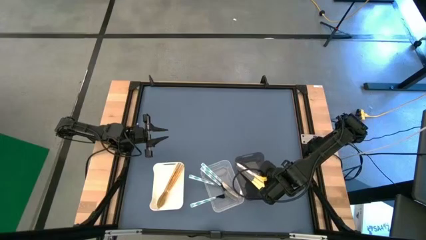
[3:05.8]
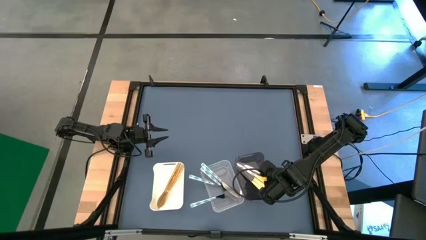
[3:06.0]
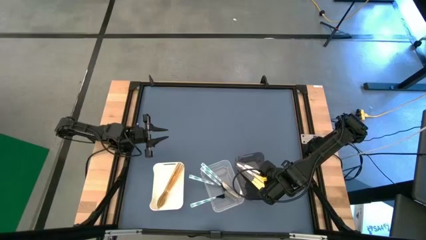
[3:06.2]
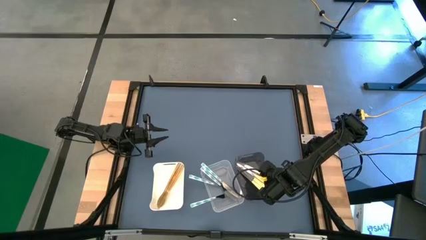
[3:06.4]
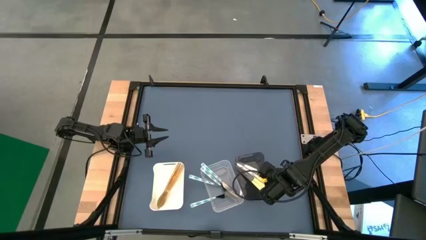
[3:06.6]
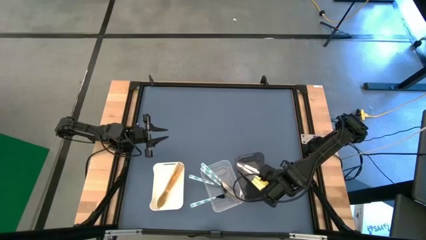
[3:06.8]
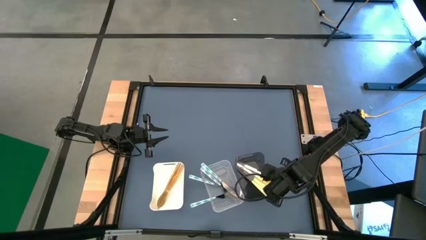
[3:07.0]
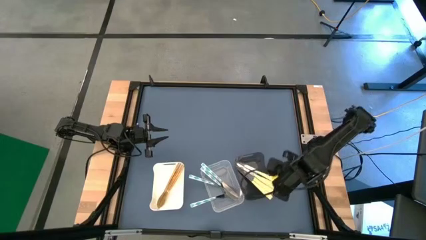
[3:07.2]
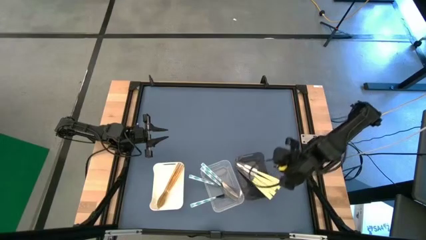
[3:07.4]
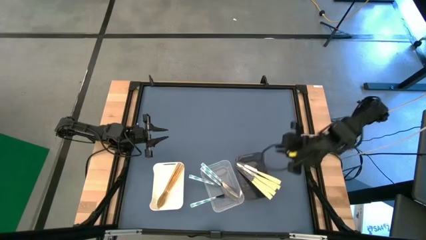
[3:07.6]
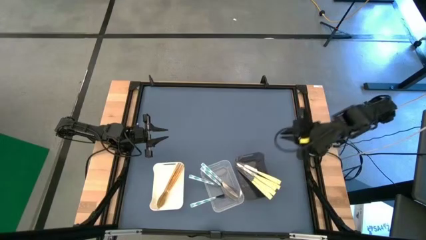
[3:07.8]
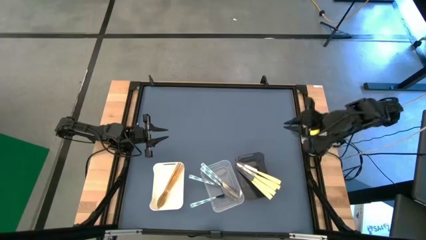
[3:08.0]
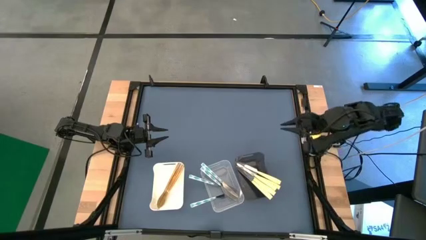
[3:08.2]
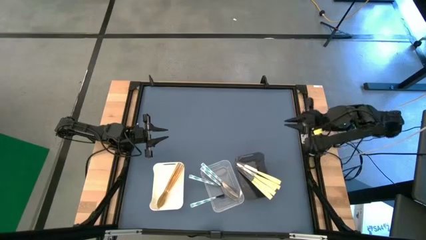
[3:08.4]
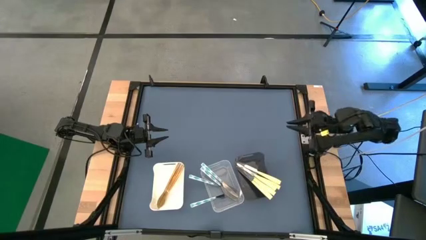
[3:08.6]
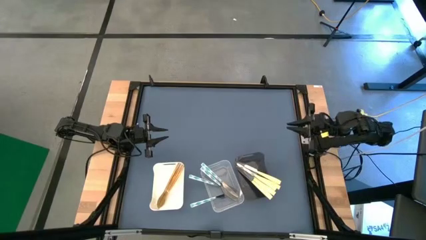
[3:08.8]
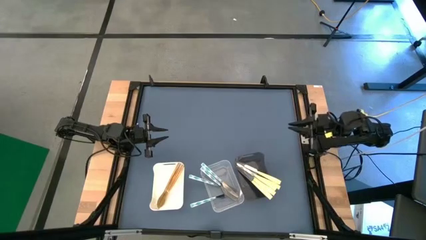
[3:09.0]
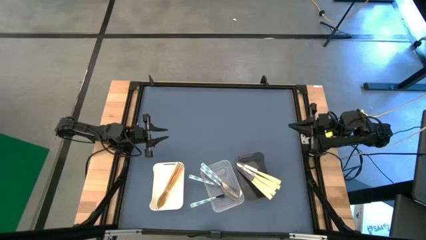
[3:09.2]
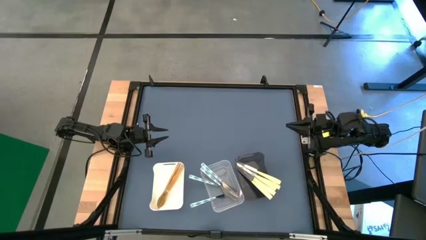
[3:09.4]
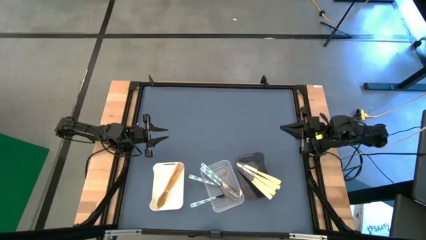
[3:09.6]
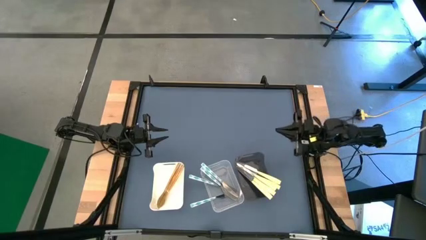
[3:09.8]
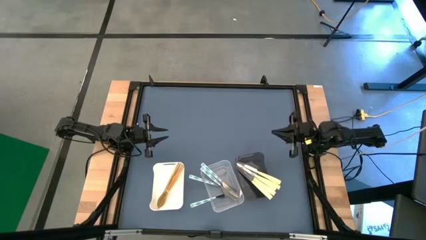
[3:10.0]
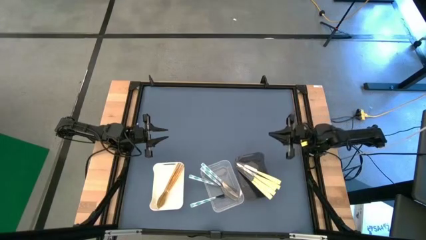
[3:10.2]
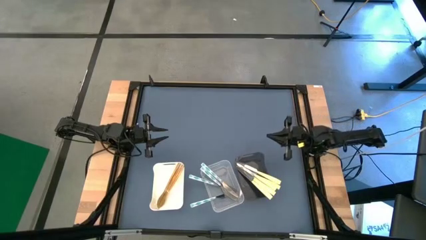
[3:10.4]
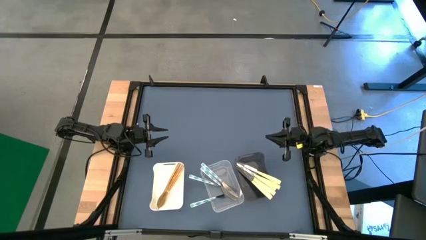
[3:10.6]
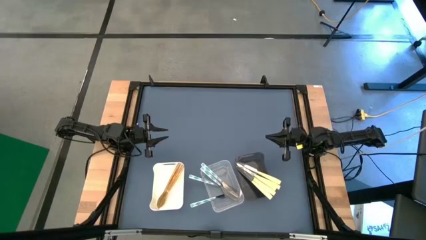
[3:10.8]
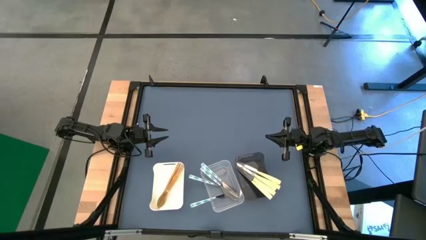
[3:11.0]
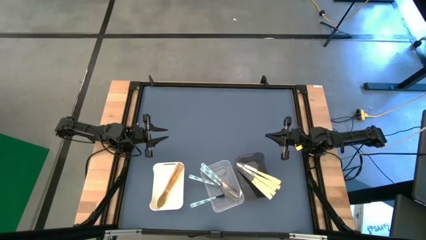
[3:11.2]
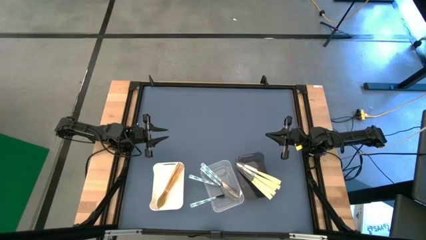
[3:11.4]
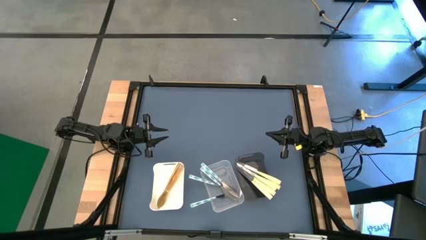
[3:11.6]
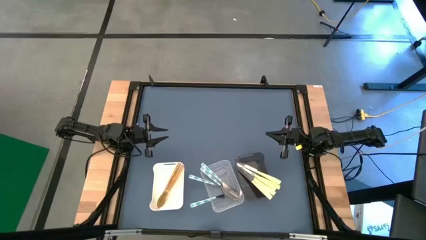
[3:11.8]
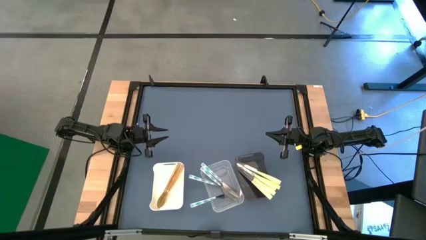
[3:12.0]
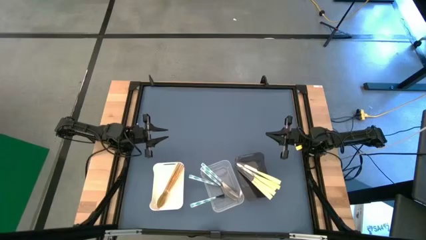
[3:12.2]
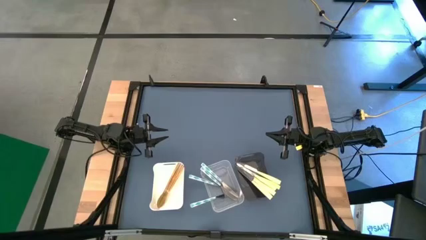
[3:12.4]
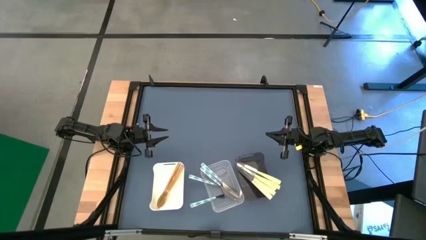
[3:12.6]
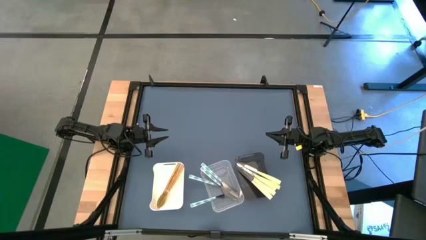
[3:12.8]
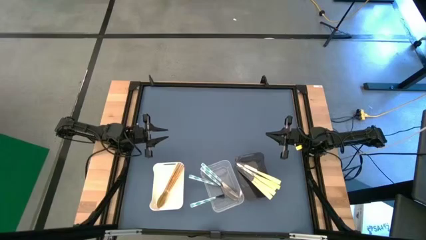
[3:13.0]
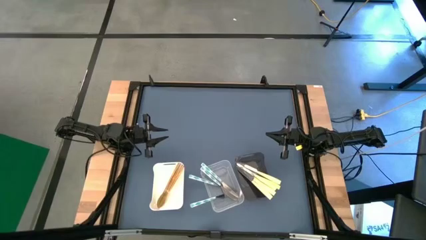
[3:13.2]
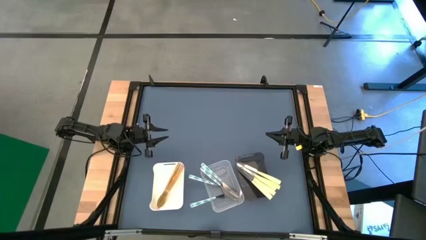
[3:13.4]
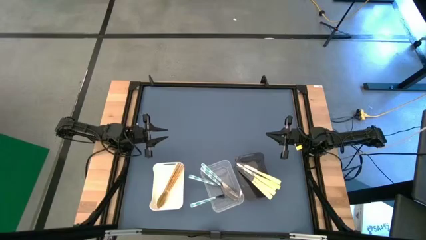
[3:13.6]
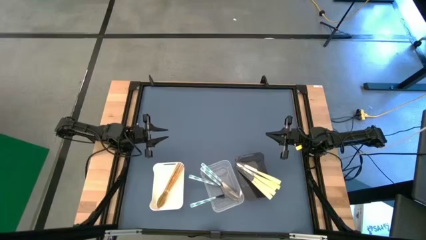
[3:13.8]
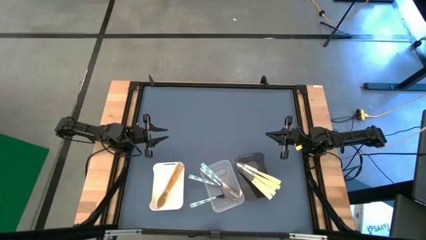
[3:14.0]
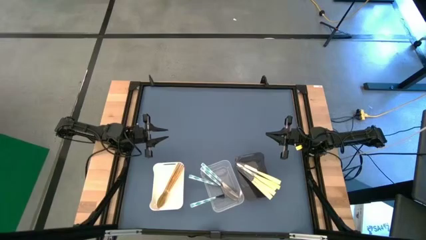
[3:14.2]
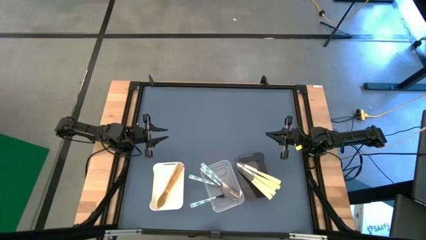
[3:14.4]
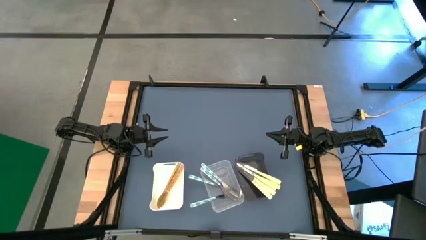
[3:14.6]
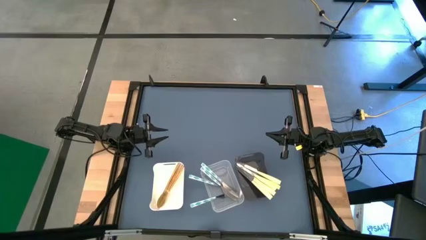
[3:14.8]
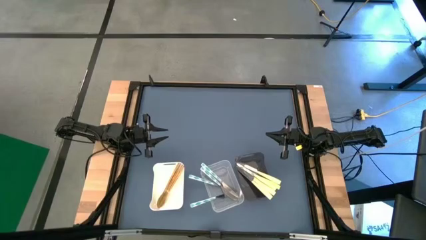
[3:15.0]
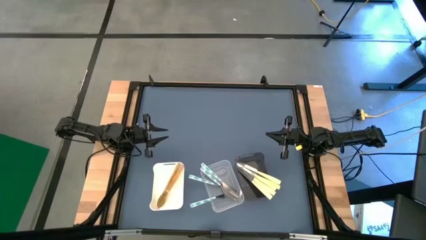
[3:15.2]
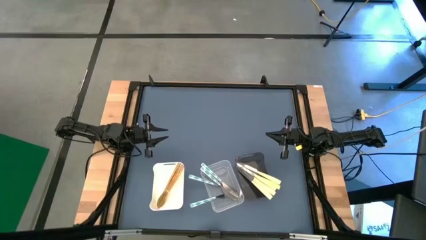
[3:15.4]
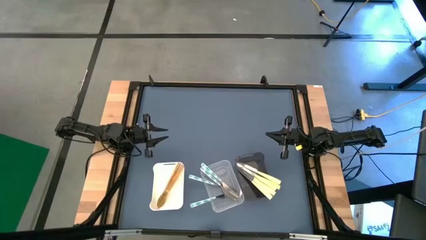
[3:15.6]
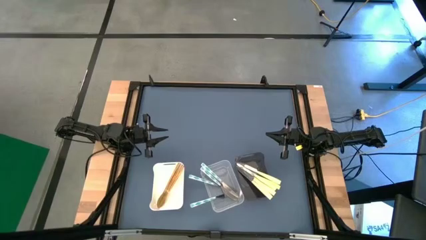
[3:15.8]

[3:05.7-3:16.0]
Task: Sort silverware by color (type)
Return to Home Position

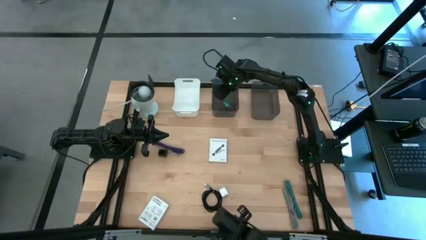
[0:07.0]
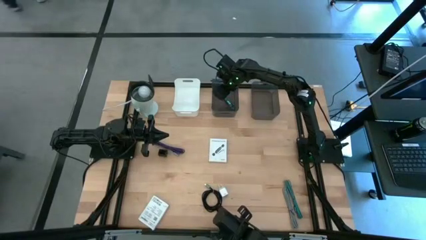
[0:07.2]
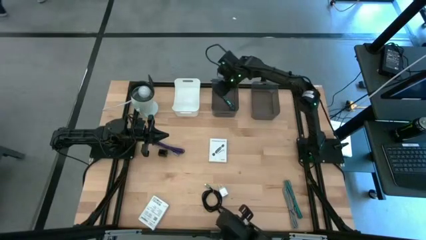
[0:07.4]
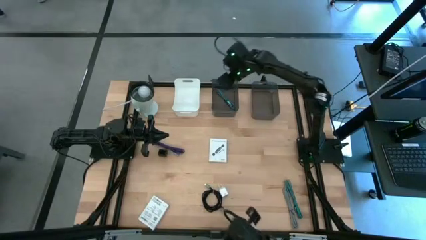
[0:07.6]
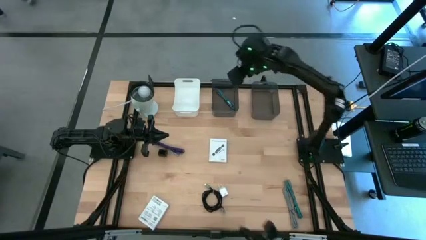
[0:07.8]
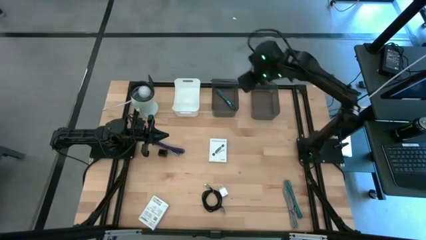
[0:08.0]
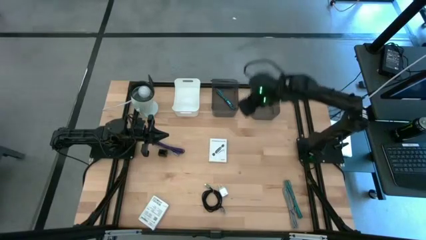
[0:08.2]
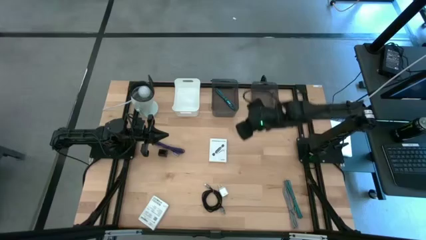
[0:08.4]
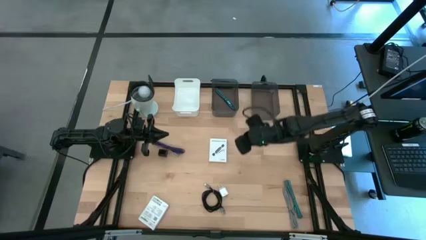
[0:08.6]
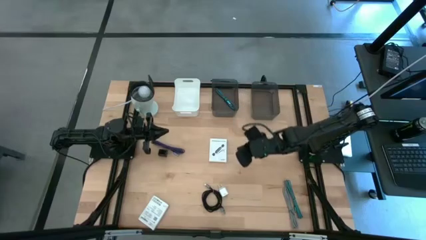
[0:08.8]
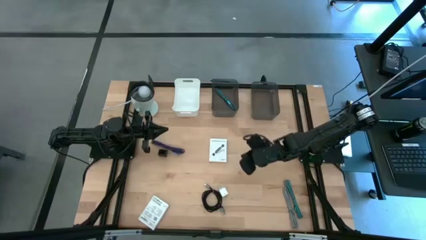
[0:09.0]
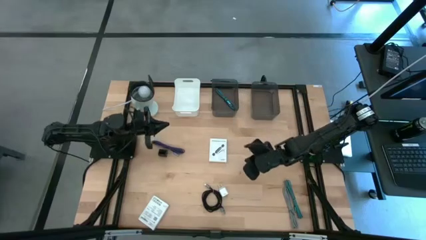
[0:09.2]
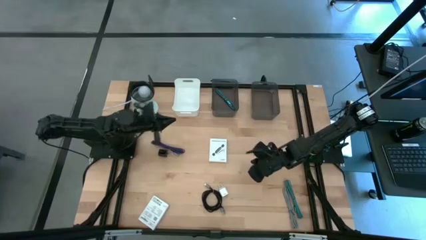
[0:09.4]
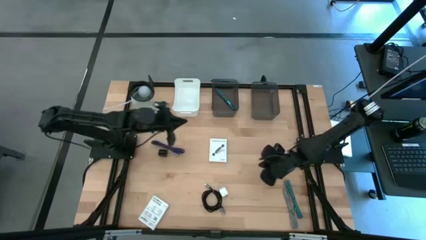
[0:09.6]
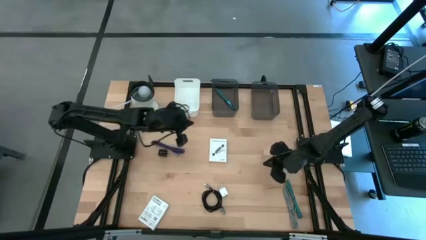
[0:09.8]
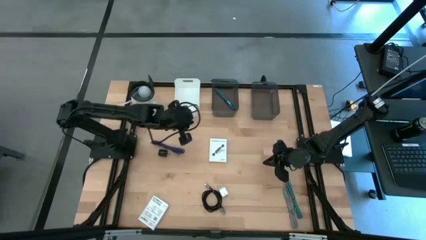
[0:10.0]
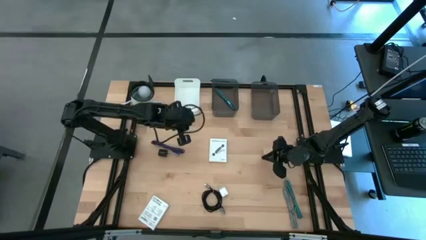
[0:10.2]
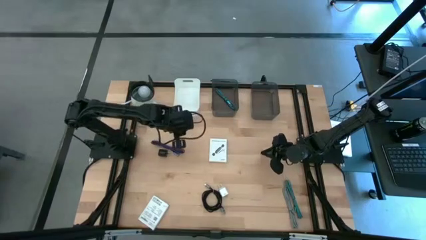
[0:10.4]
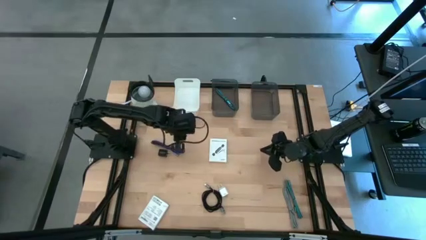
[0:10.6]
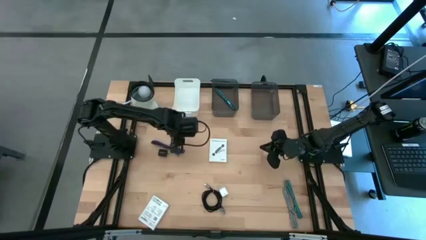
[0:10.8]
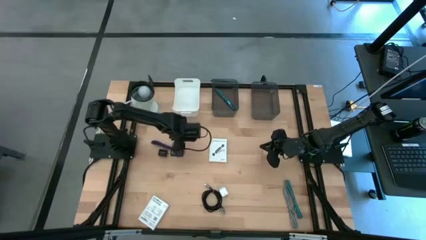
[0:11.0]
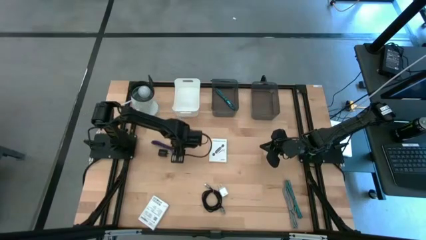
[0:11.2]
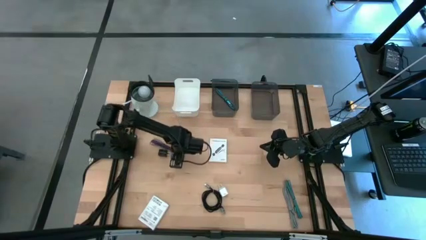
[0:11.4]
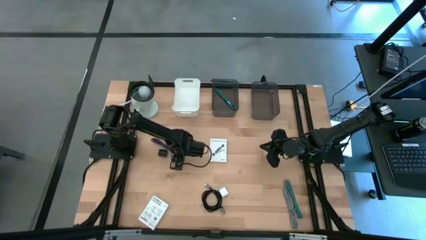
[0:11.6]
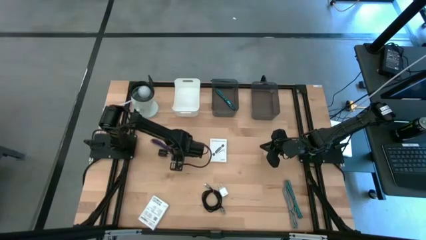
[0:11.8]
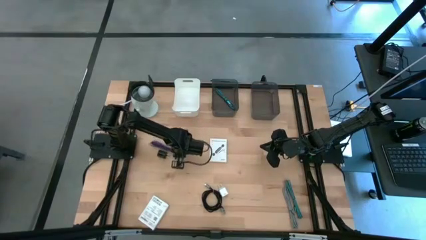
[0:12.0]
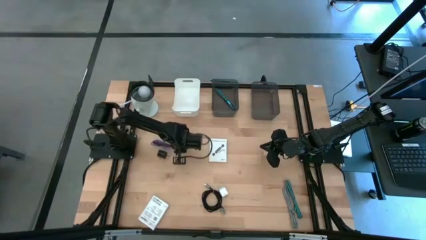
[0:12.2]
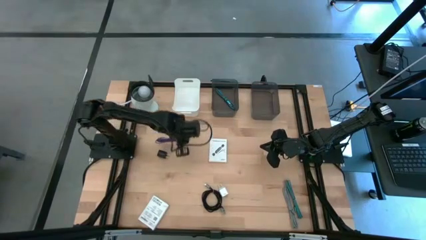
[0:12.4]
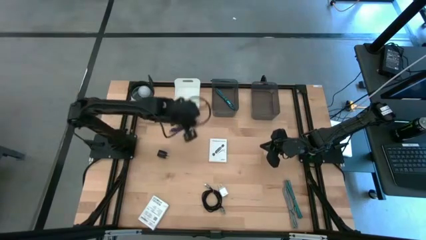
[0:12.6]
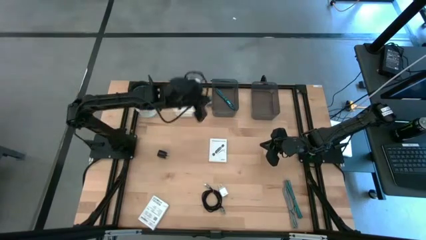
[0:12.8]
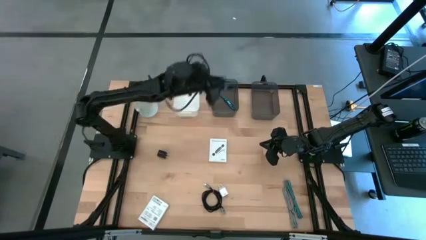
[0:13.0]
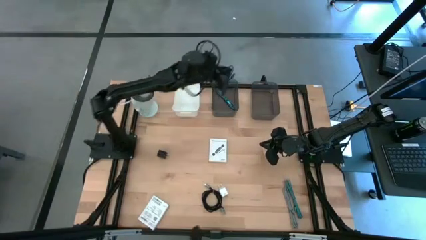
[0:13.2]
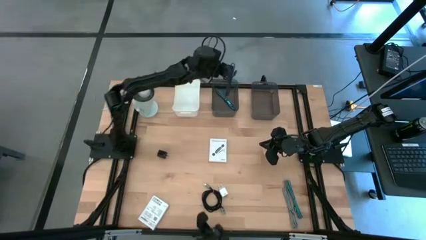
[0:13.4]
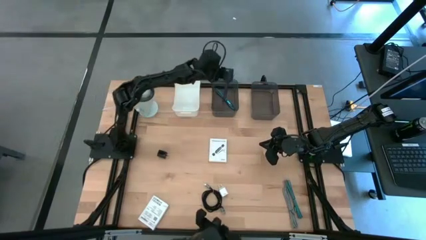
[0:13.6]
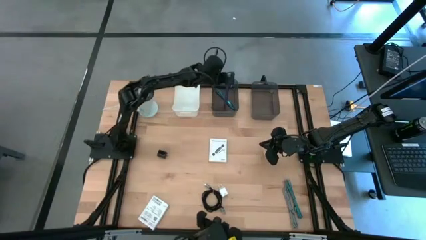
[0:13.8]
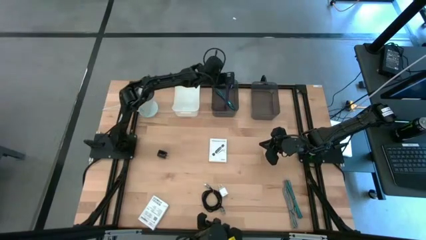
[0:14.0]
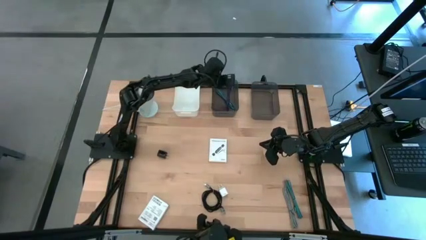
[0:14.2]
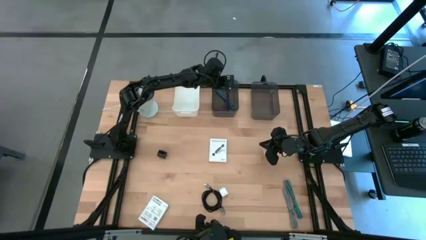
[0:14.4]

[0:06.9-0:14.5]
Task: Pick and place items into bin
Put the violet charger cable into the left black bin
